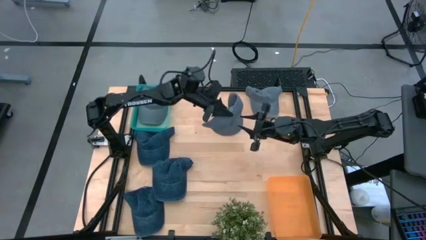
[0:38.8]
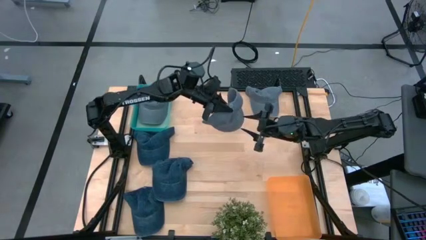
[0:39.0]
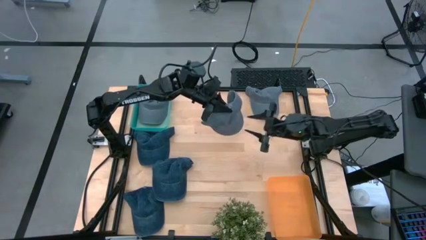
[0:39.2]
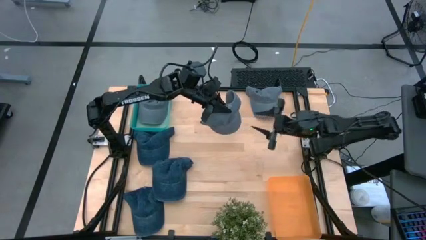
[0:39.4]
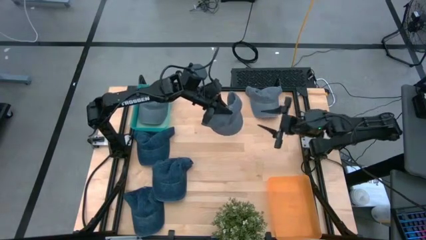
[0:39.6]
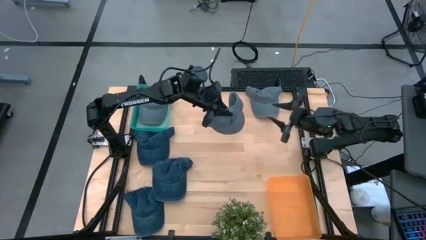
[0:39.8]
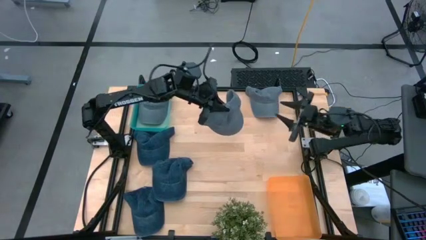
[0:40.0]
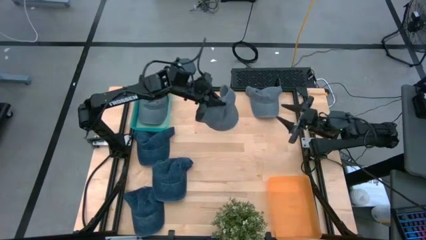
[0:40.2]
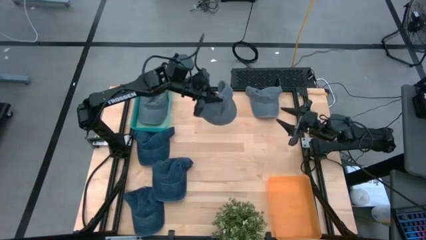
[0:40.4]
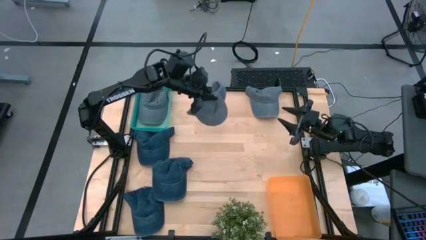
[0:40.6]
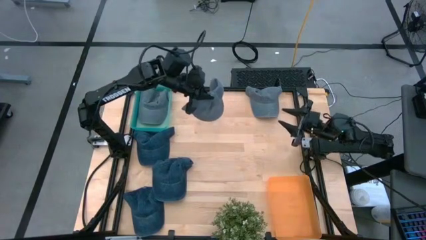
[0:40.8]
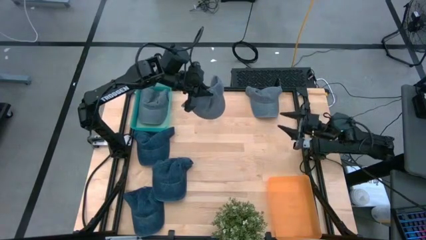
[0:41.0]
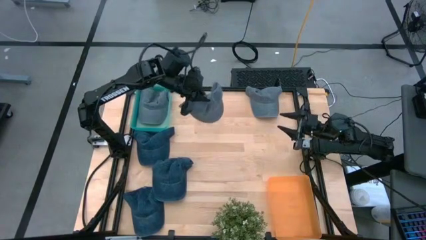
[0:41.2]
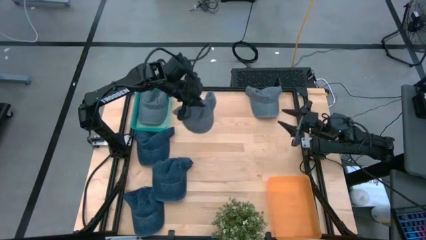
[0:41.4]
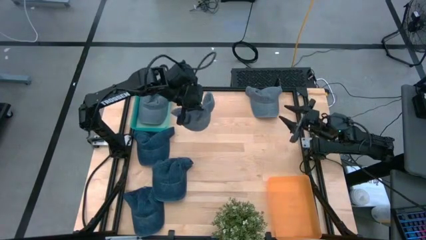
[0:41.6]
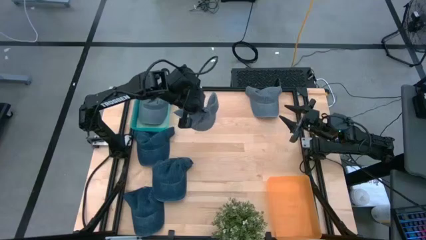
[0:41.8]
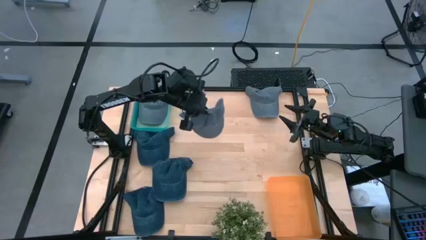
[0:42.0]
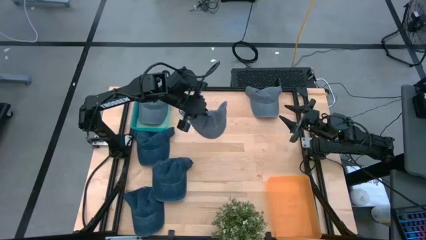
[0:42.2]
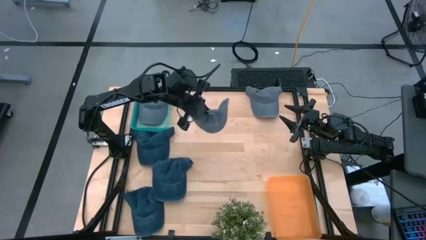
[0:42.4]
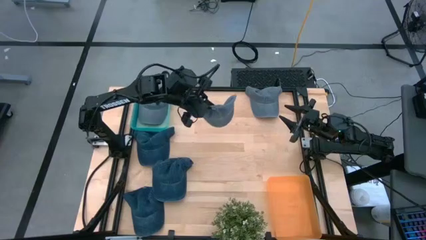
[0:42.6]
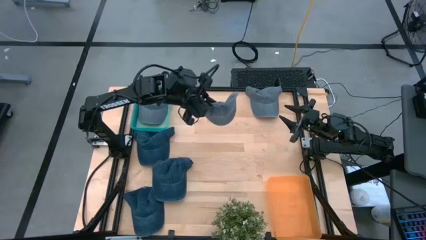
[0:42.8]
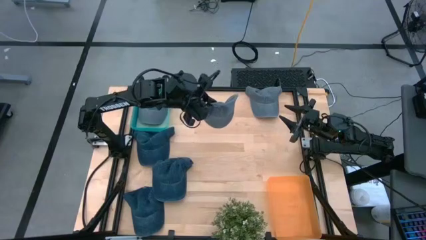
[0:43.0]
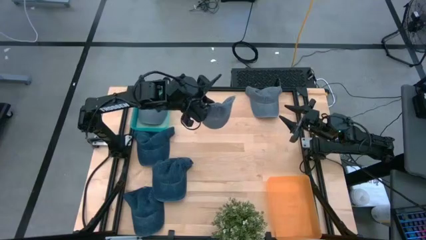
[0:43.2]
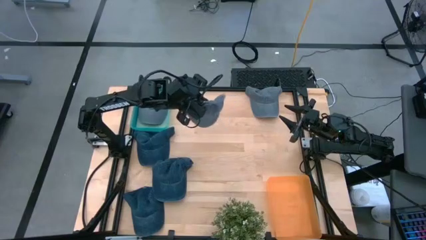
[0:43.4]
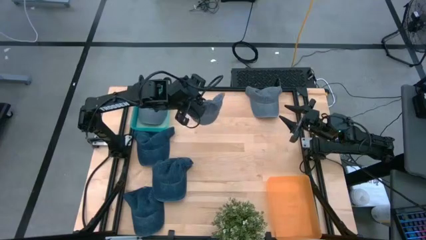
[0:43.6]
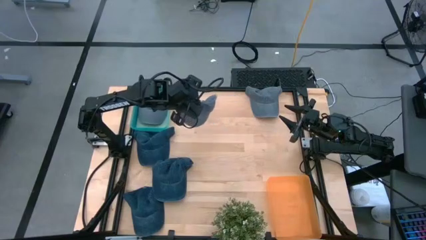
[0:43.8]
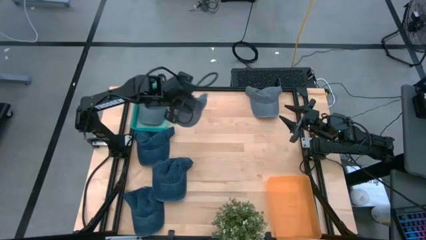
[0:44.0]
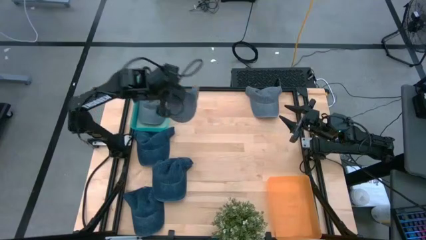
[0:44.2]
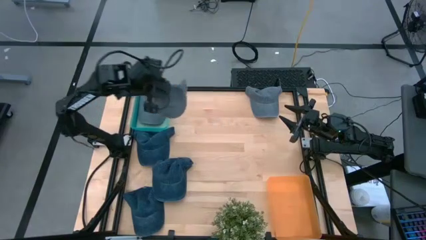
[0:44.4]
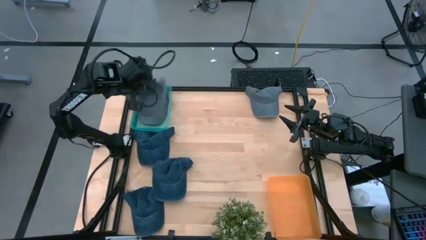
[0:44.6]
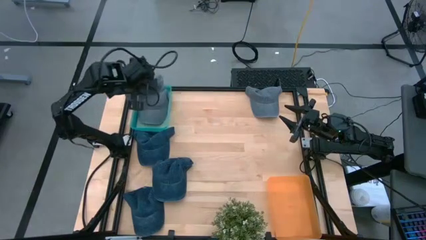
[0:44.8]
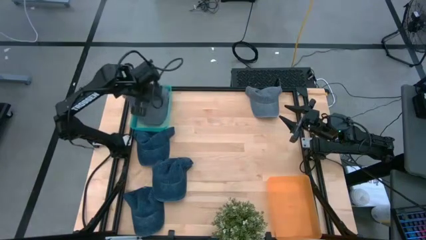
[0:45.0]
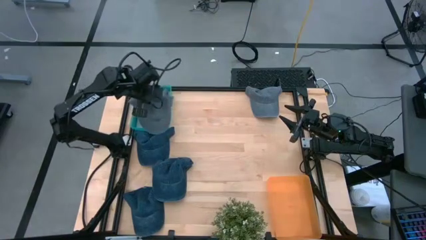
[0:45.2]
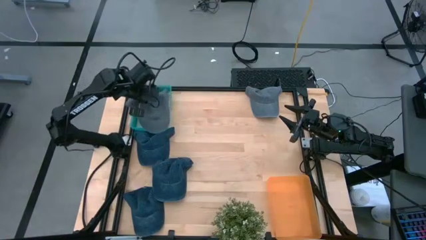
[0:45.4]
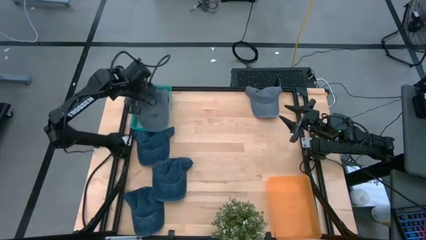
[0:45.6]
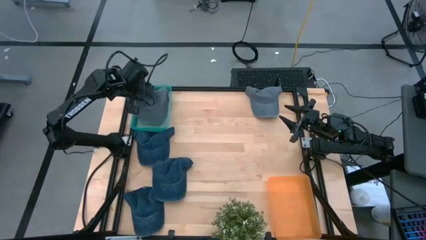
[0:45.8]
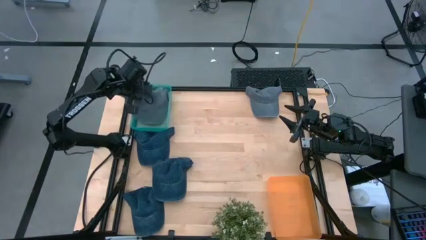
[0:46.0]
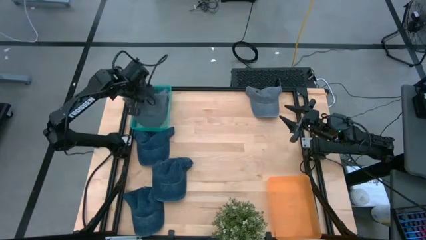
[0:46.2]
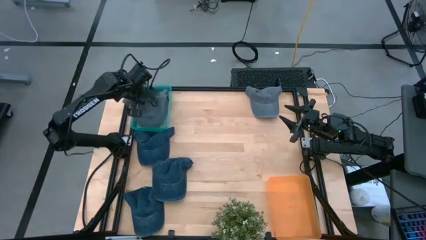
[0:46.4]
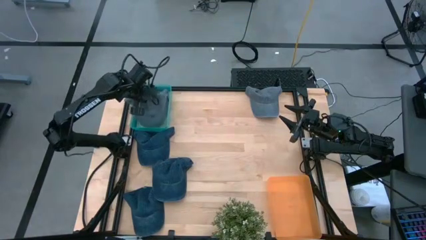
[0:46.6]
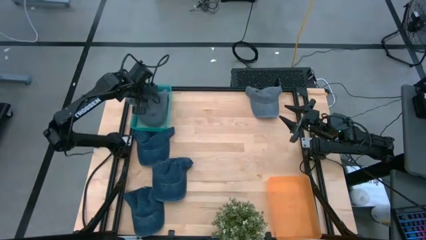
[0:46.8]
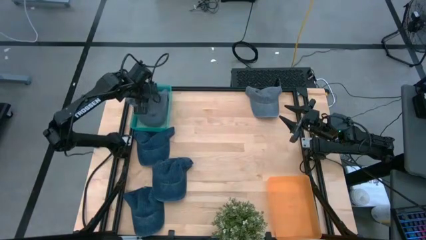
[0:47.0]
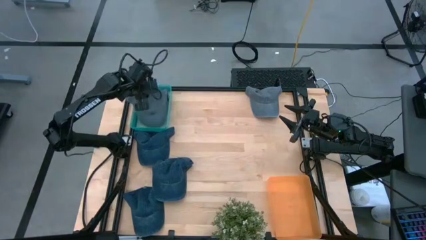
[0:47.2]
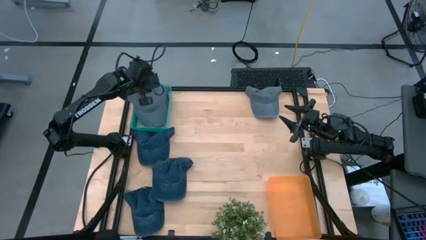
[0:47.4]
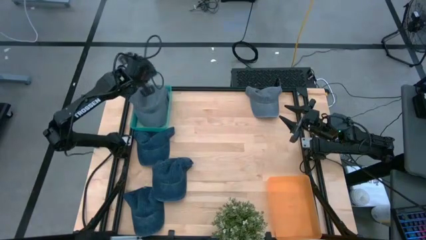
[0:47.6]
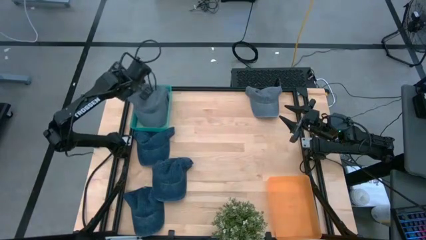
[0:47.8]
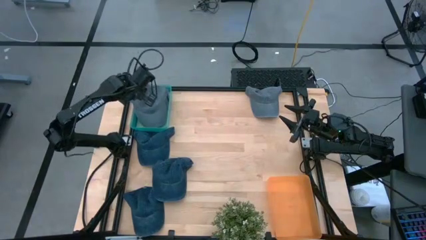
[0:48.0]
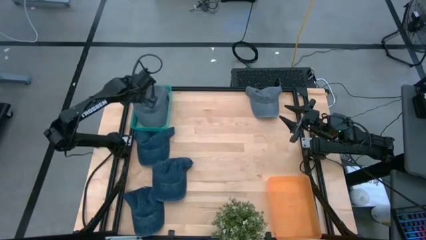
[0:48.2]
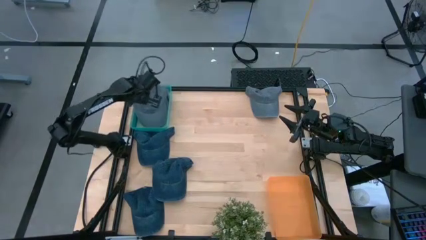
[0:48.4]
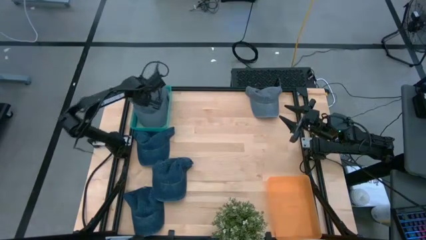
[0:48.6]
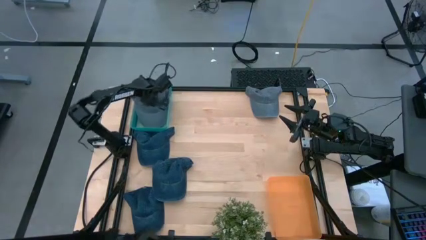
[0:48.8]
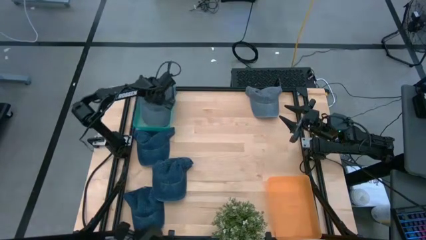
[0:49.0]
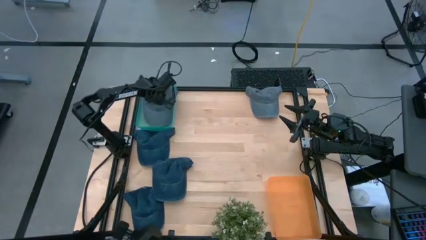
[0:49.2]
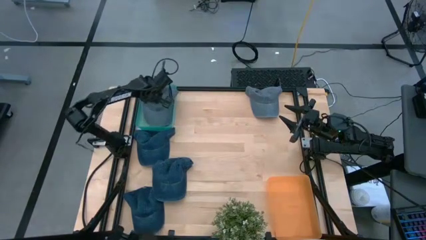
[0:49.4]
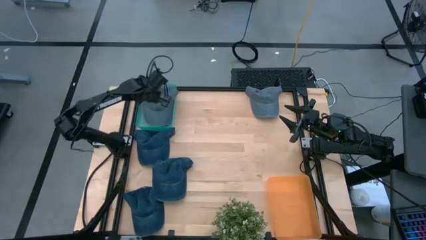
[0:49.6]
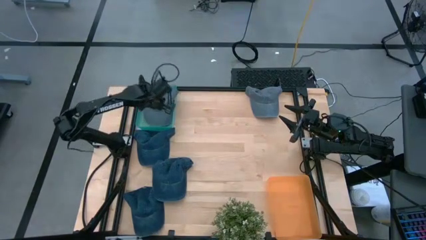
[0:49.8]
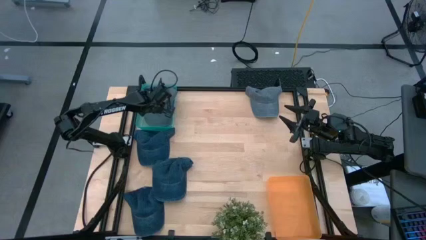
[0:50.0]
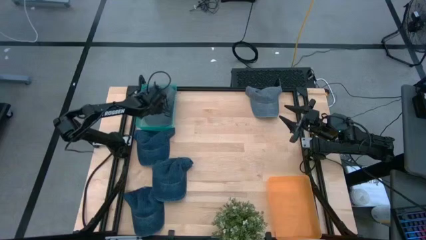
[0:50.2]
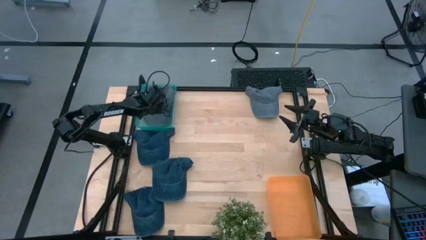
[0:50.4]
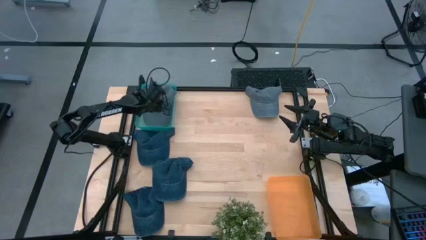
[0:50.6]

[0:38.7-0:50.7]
Task: Pick & Place hat
Put the bottom gray cap into the green bin

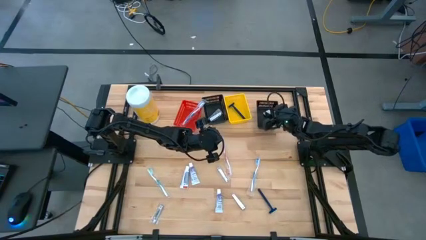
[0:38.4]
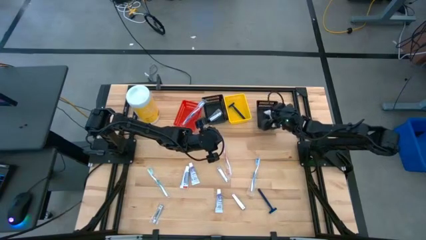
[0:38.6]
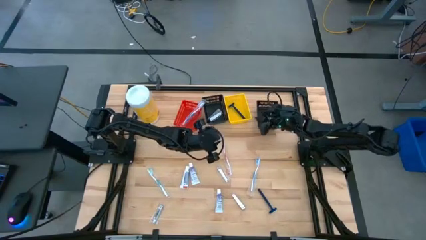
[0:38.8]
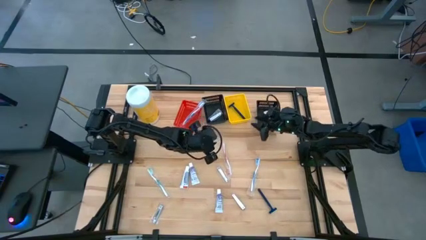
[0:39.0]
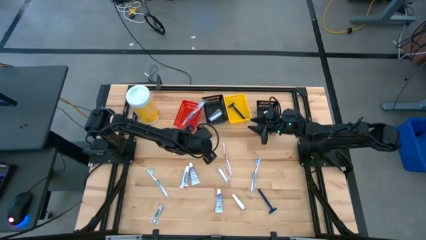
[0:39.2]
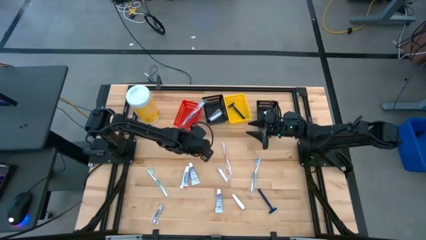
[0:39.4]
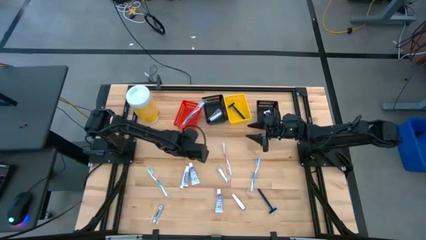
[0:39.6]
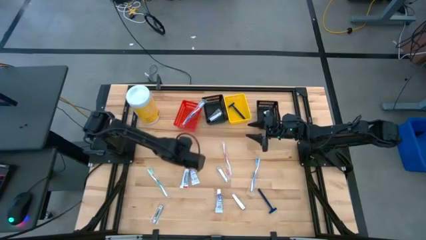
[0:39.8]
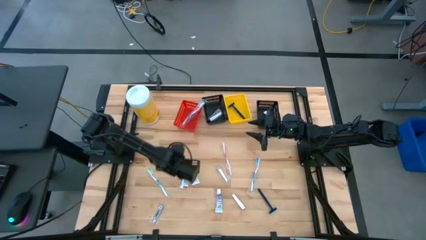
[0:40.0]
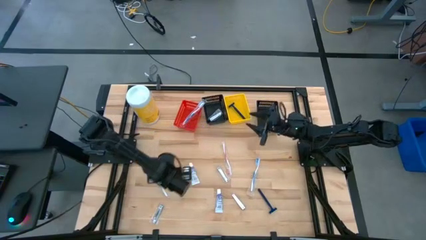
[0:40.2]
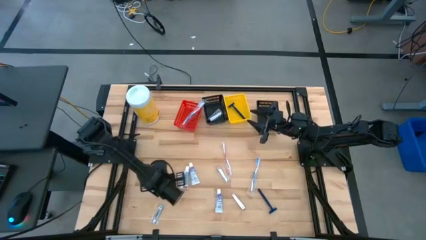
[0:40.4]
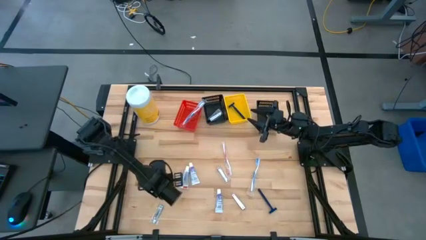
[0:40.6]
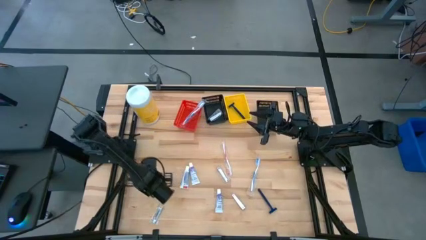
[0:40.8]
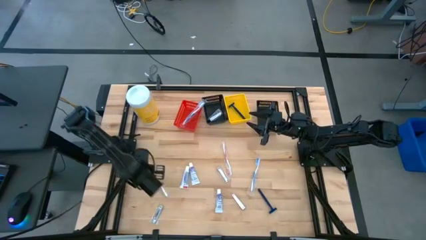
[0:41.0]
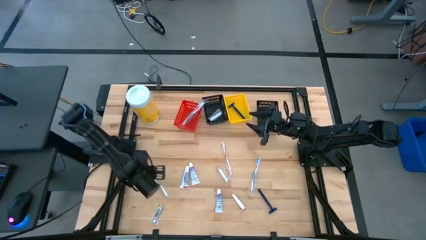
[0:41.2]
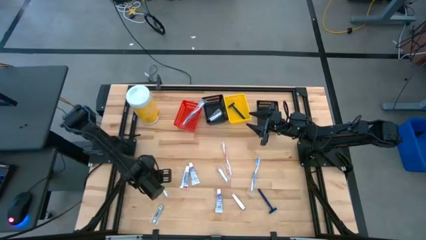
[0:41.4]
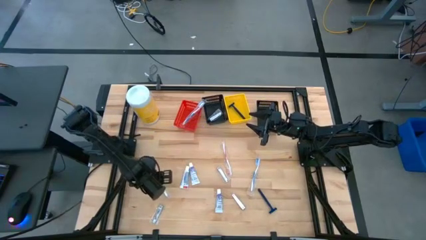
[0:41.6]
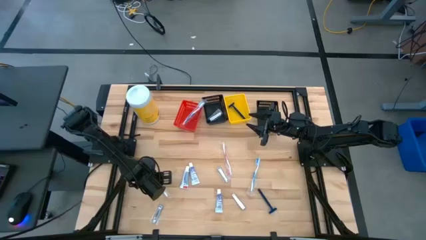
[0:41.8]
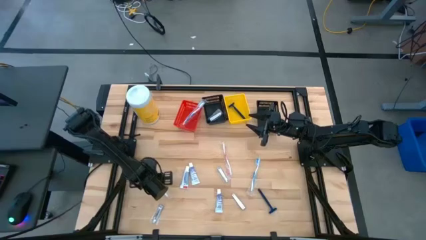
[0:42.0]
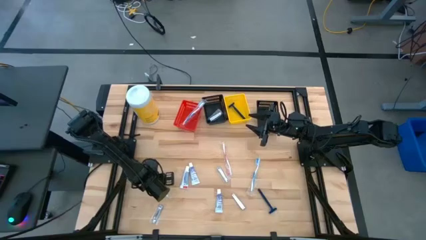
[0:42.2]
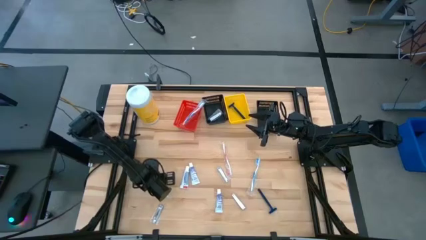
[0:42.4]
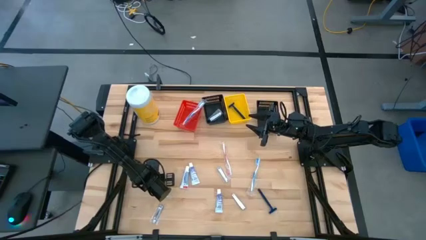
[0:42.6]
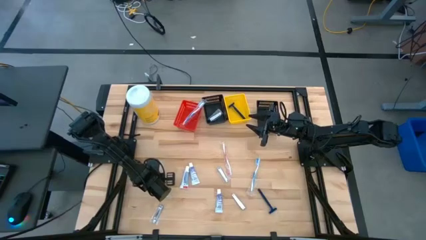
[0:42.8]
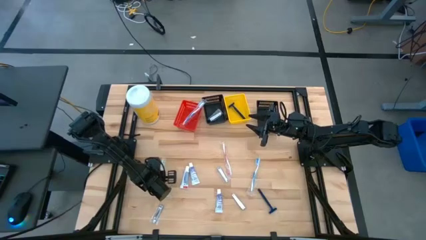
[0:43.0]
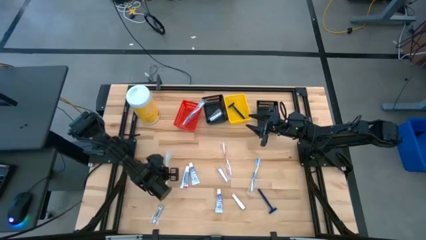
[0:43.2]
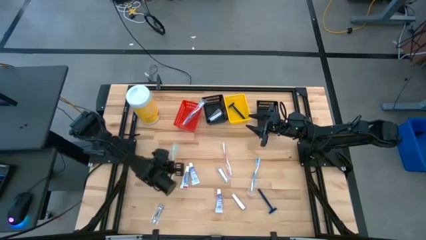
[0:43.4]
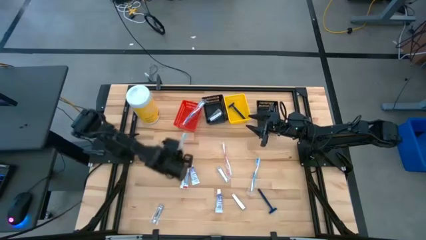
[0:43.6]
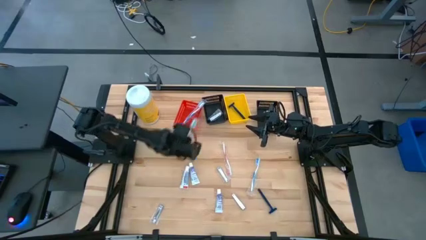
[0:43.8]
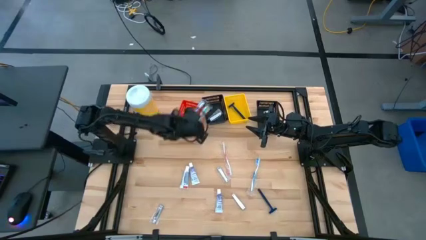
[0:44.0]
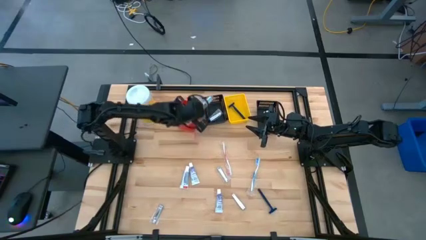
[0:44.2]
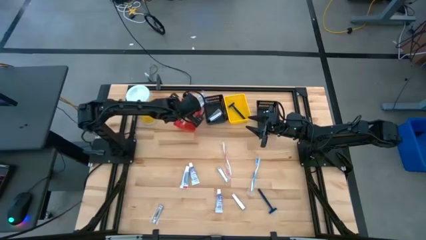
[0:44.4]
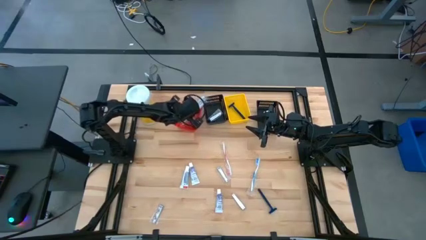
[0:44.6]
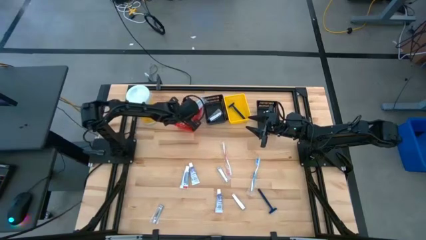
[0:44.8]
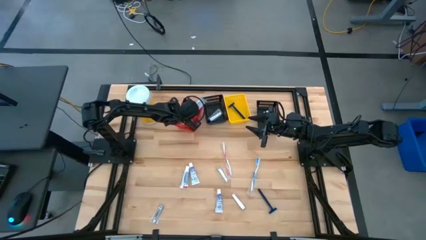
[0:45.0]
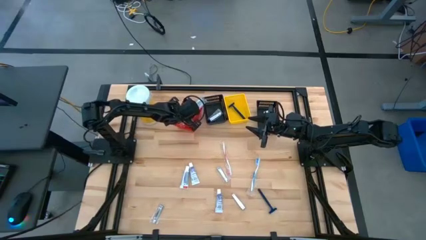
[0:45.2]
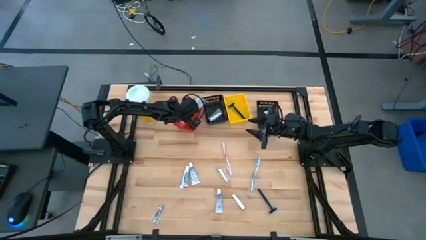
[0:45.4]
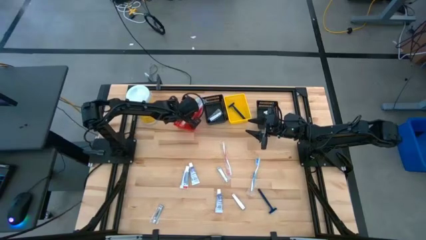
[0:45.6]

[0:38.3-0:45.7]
Task: Pick & Place Travel size toiletries
Put the green toothbrush into the red bin
